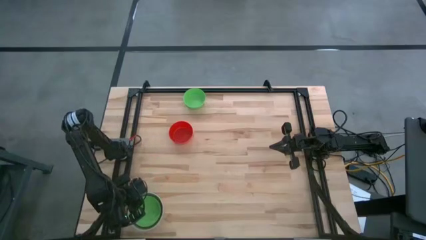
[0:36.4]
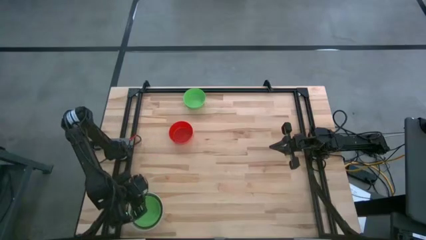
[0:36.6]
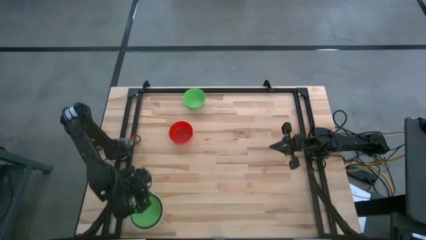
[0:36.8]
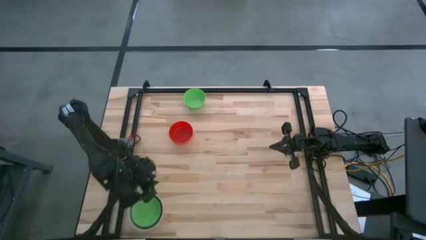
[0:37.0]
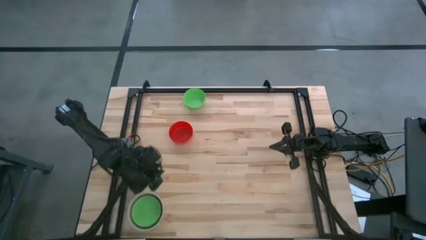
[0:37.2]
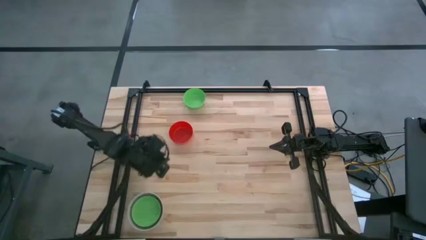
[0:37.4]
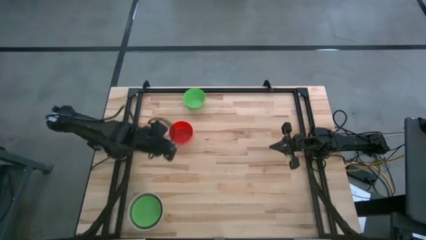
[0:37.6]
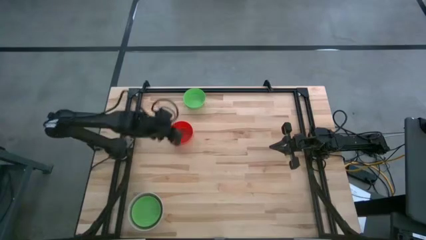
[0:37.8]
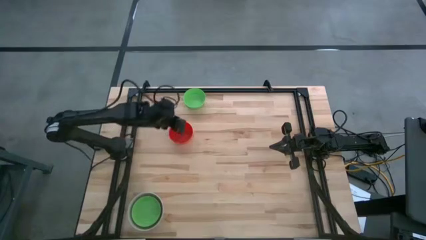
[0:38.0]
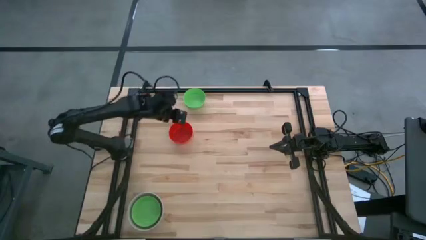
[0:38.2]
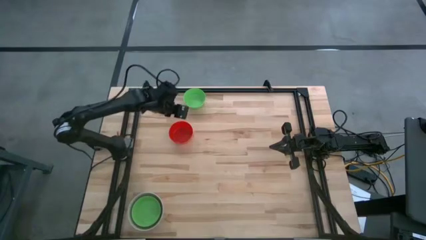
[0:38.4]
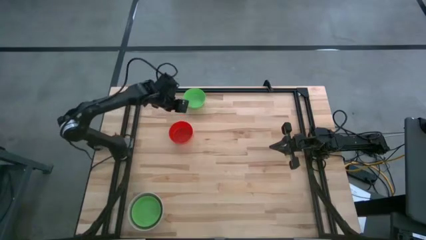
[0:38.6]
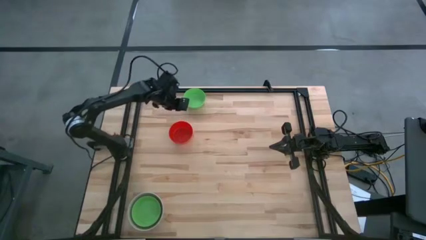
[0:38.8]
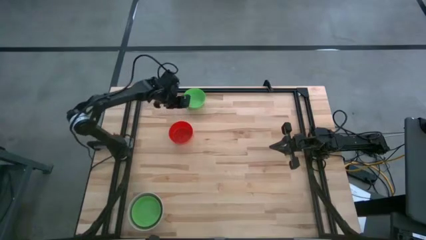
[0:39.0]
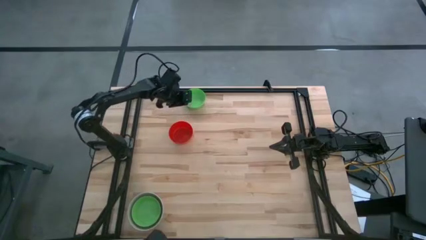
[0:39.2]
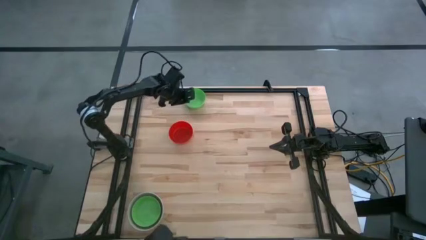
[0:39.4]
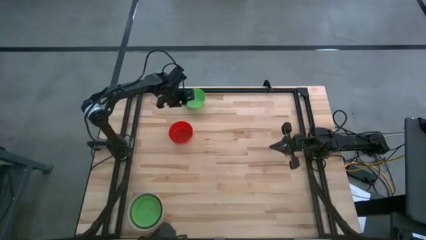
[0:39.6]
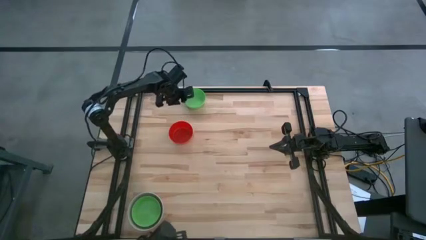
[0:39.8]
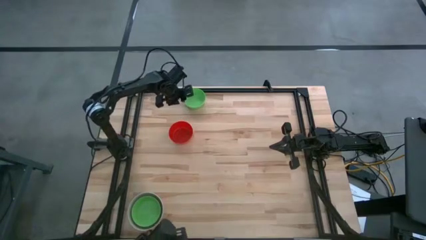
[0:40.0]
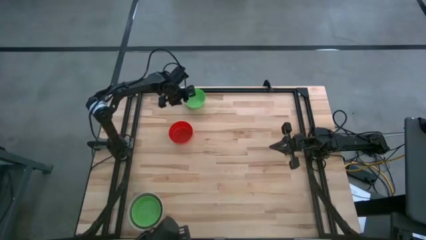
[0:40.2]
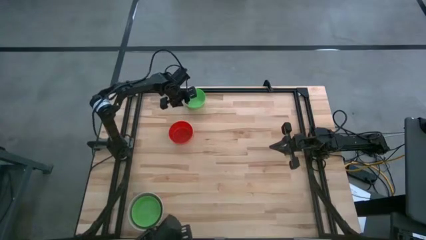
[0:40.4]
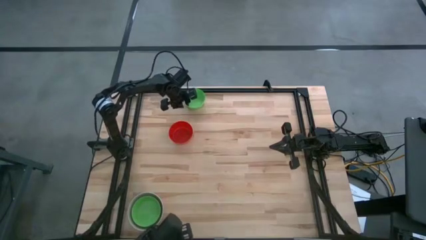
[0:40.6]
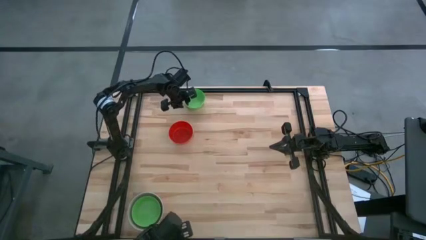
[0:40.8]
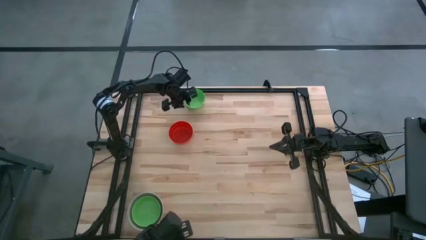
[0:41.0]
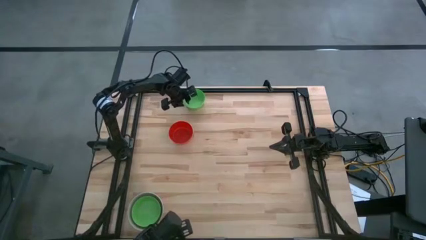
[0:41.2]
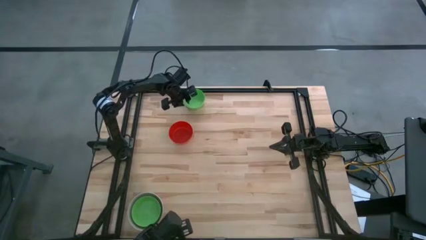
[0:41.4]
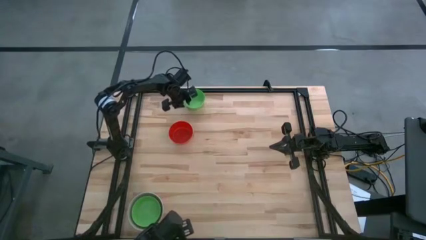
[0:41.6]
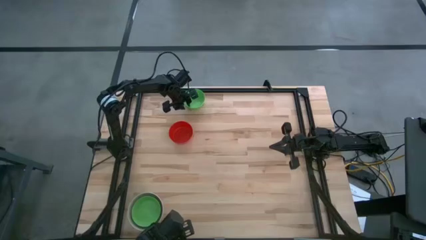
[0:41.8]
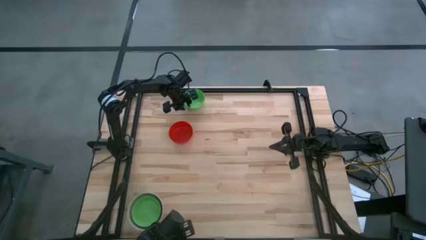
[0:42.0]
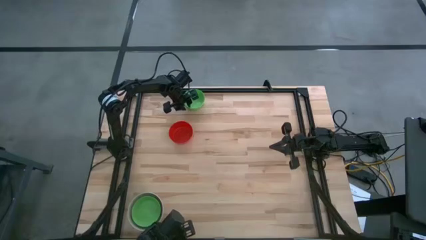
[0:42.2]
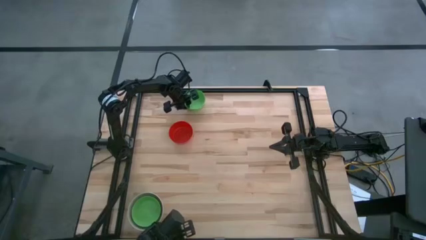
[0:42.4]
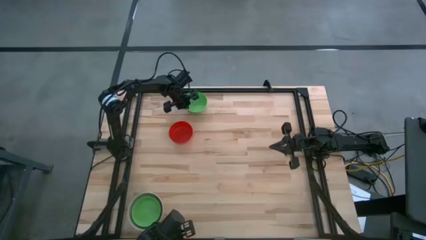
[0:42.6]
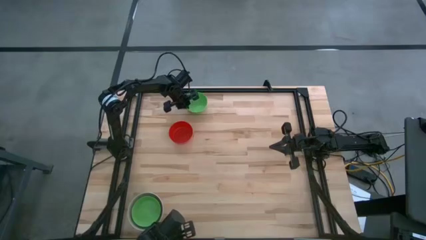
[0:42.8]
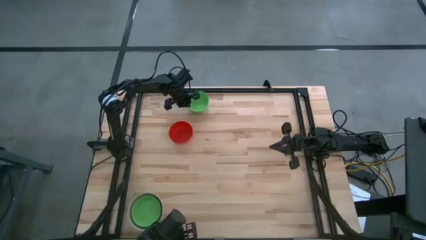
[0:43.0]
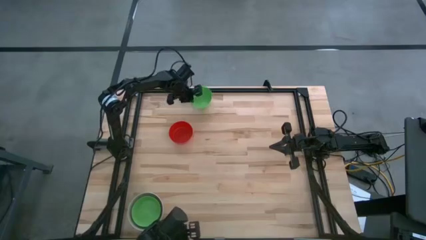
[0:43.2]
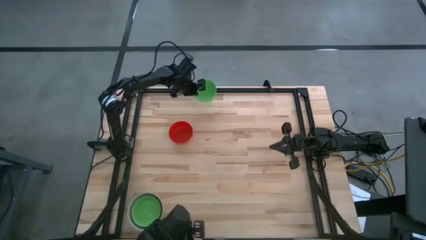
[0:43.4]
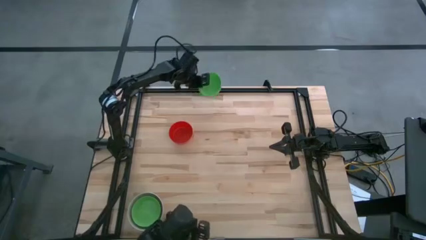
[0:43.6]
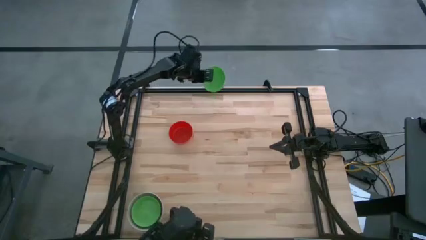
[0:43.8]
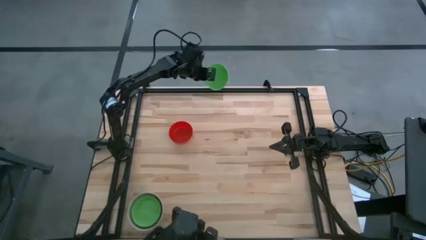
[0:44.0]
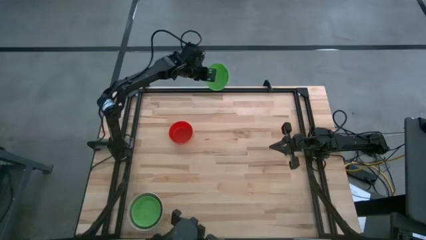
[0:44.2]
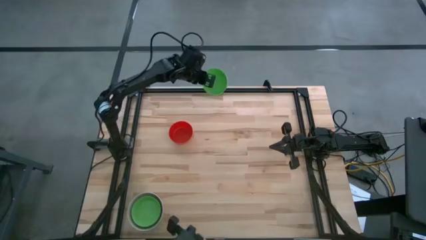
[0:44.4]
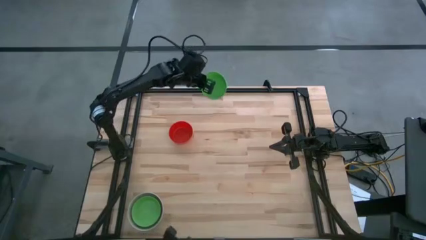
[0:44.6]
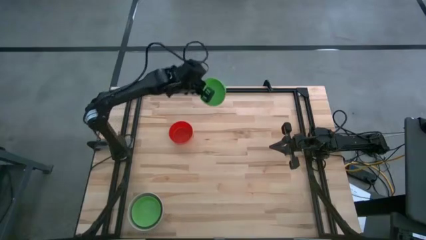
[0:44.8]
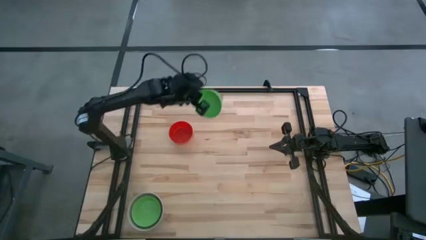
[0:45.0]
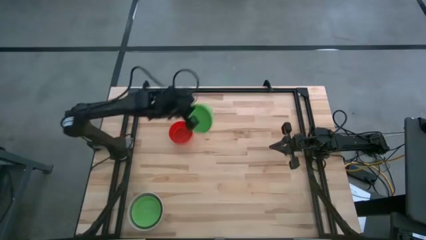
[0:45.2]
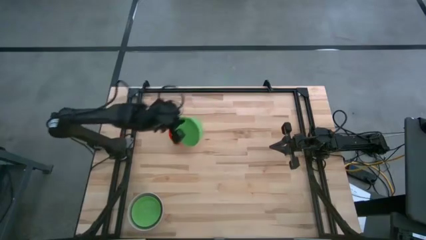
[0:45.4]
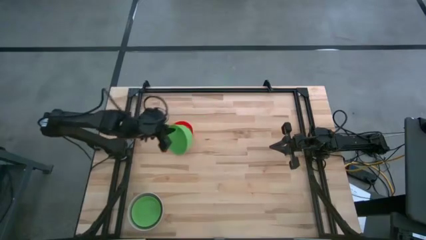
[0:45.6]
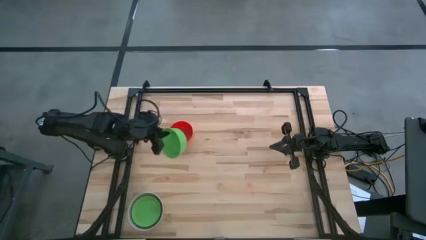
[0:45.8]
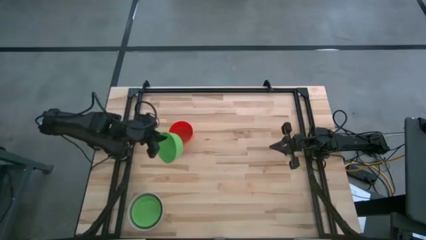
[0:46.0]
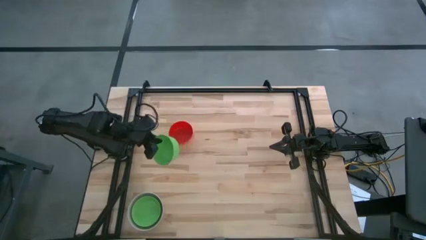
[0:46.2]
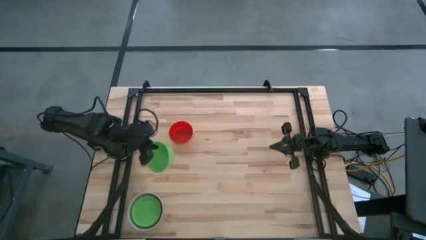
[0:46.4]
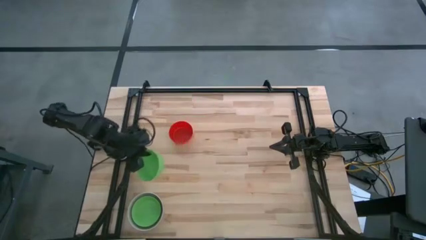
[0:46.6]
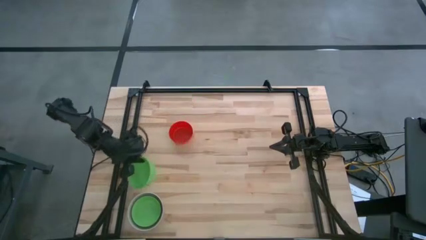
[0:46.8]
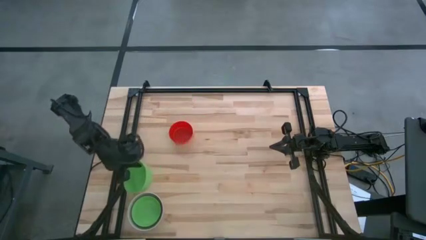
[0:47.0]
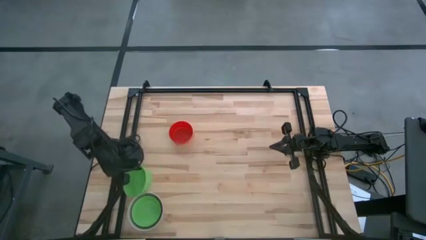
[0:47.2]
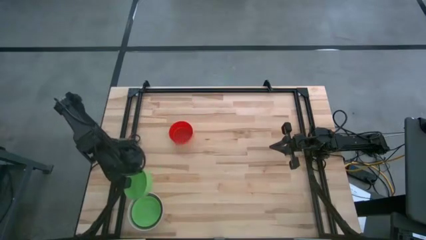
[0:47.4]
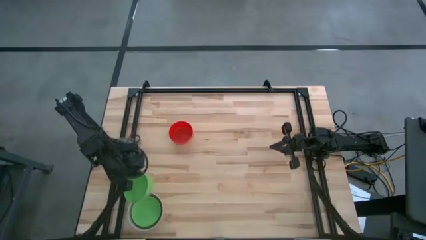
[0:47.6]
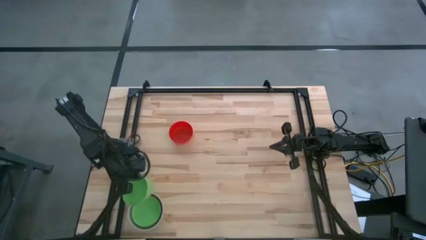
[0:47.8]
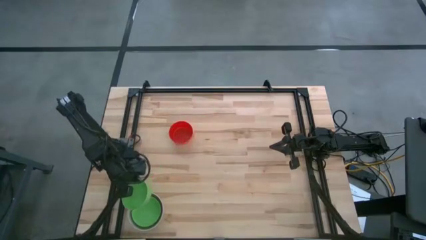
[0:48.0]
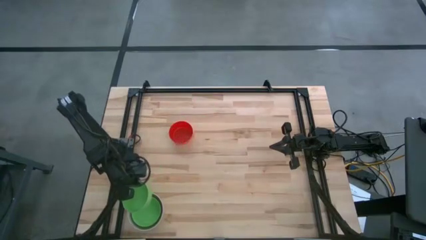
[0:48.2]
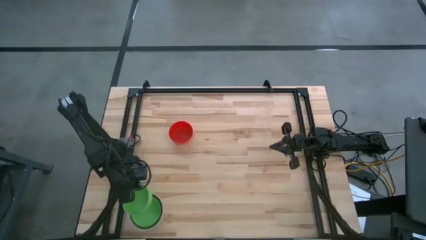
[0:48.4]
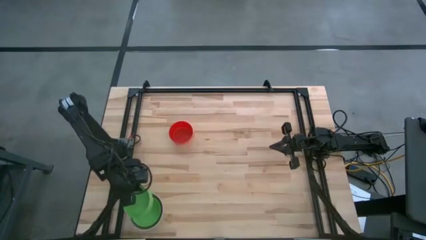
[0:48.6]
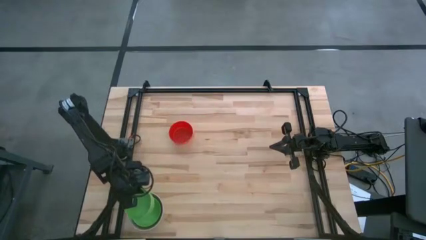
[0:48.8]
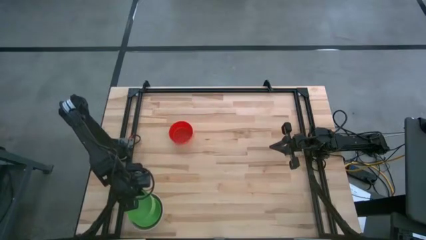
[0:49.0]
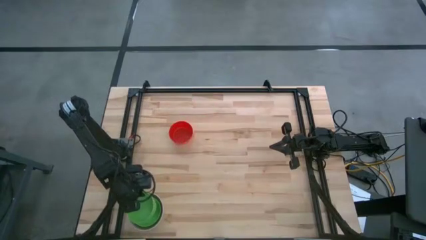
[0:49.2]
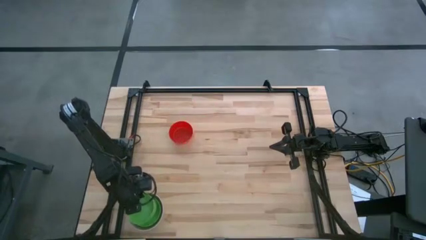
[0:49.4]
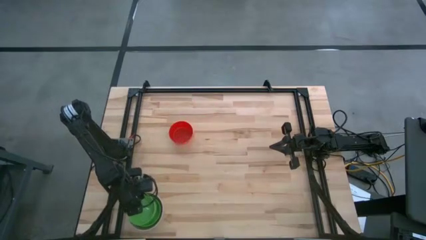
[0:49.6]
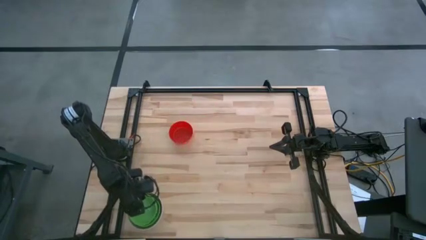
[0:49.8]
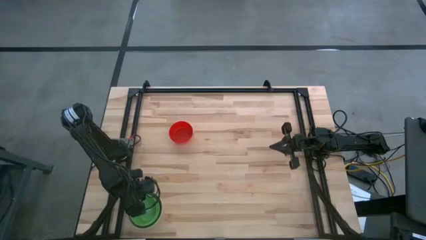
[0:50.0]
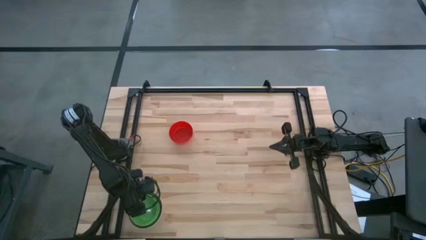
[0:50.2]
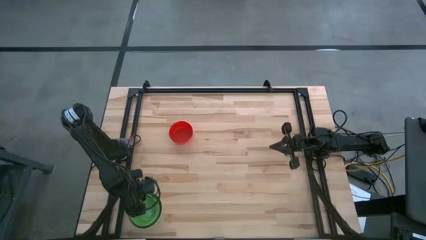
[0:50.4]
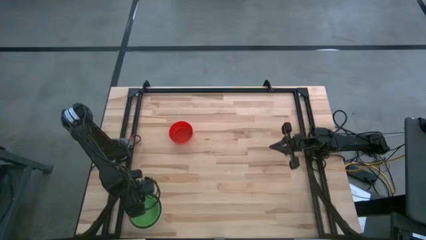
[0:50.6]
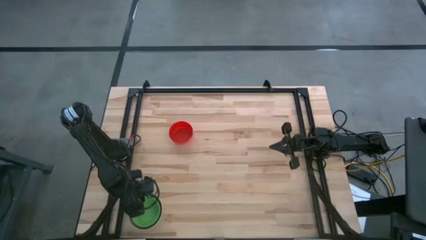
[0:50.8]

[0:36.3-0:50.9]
Stack the green bowl on top of the green bowl

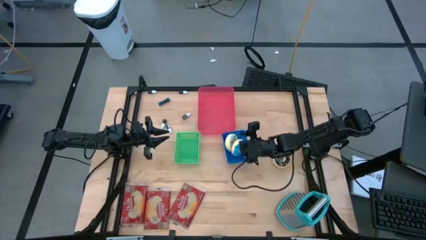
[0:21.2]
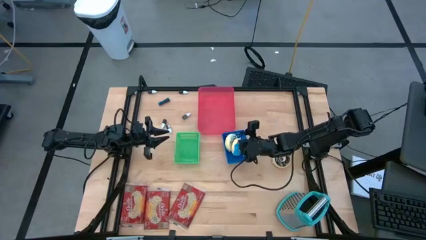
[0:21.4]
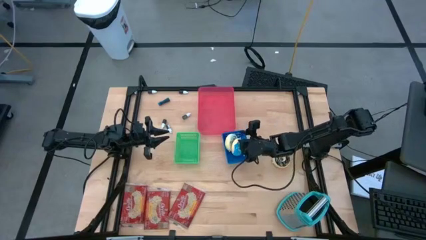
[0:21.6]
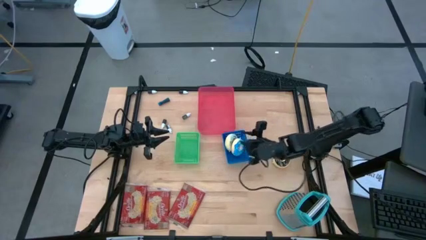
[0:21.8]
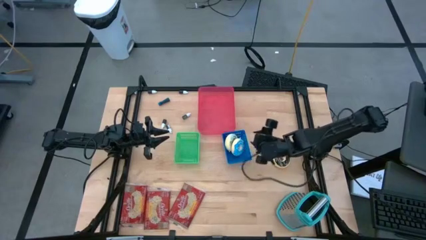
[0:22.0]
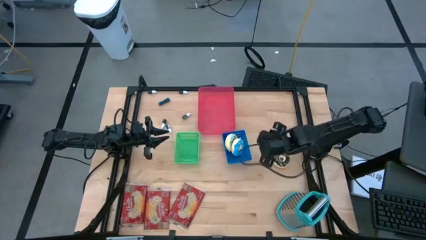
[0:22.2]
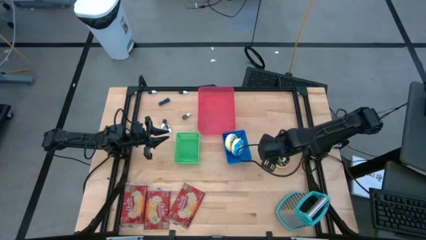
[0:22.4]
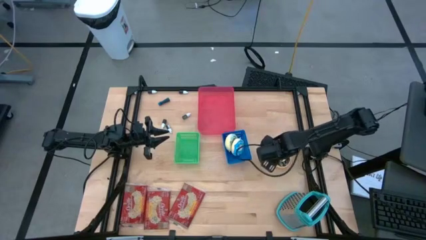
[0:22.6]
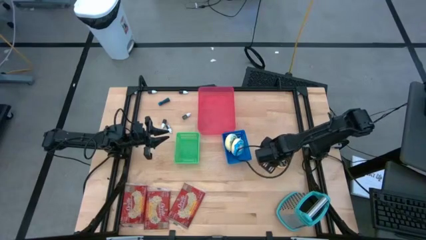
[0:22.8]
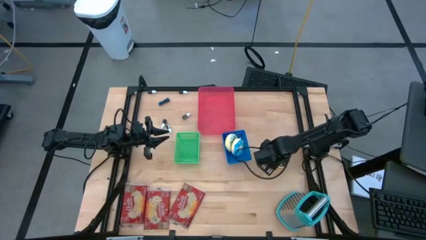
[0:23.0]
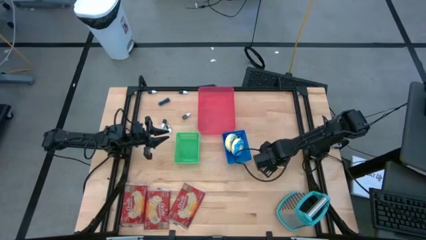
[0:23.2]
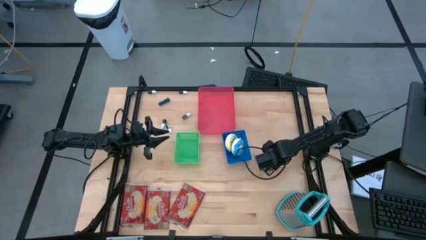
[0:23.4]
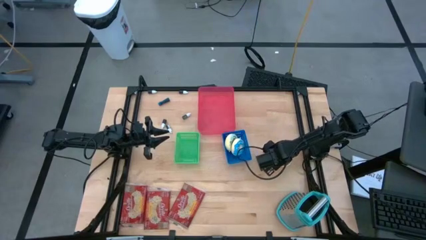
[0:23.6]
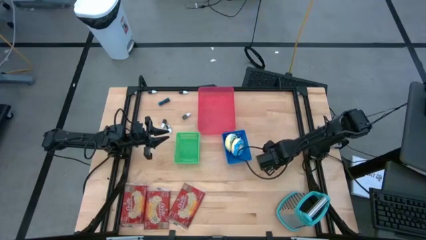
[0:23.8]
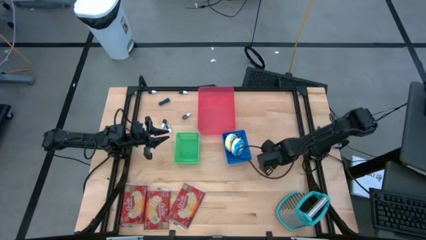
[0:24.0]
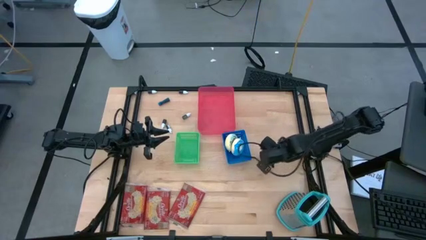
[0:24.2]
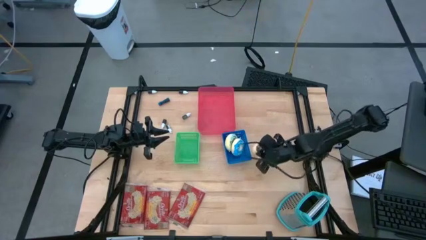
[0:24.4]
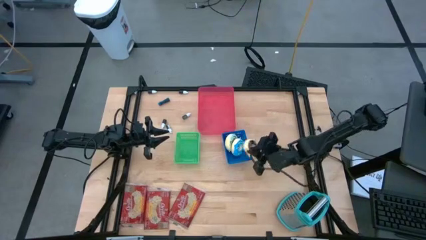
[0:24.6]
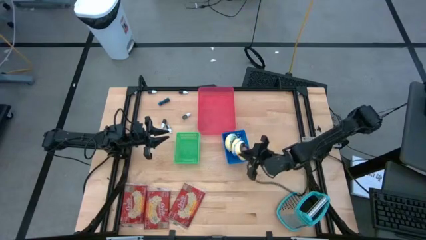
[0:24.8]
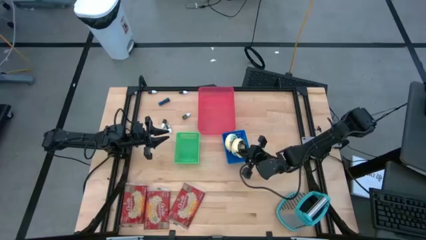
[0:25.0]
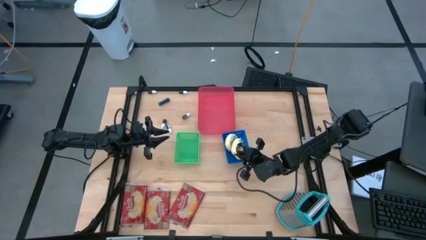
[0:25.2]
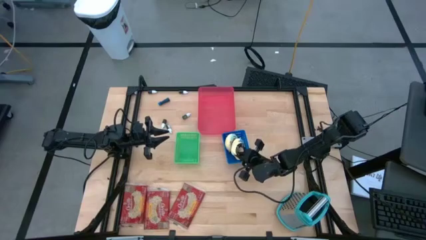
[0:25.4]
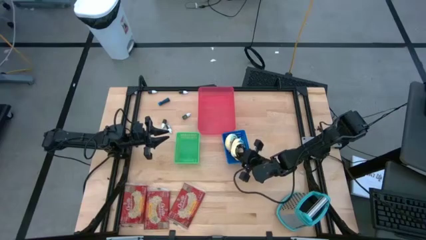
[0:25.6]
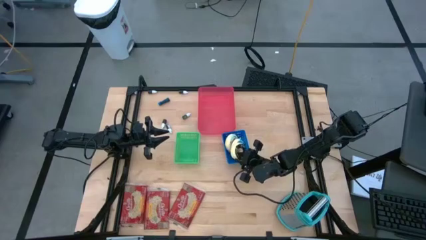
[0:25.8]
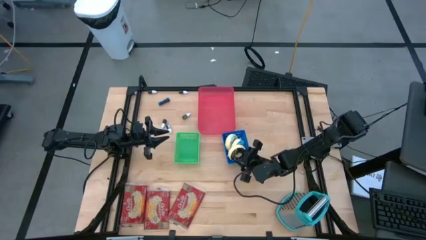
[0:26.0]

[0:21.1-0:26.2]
Put the black doughnut into the blue bin
